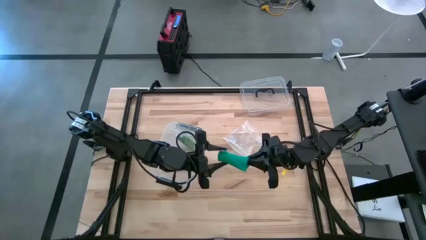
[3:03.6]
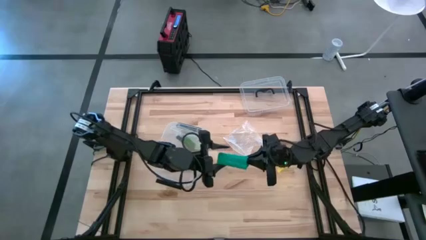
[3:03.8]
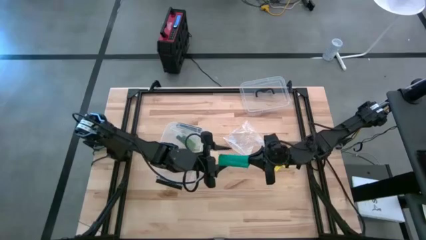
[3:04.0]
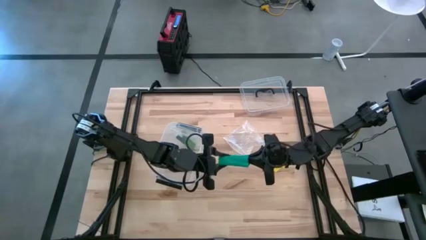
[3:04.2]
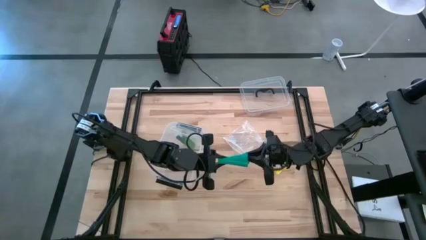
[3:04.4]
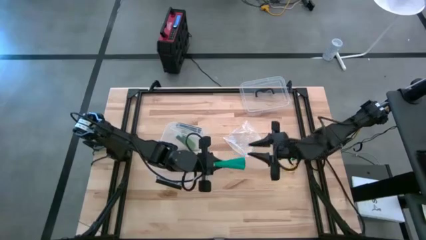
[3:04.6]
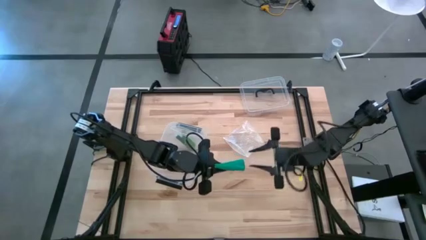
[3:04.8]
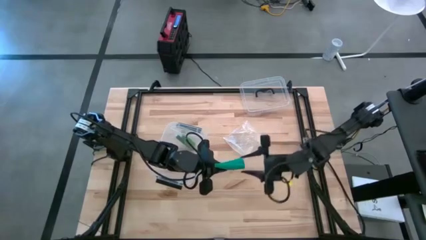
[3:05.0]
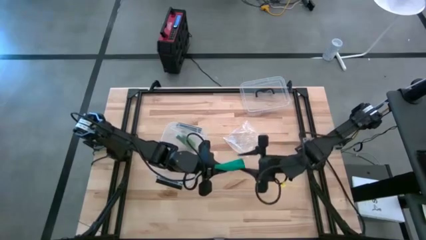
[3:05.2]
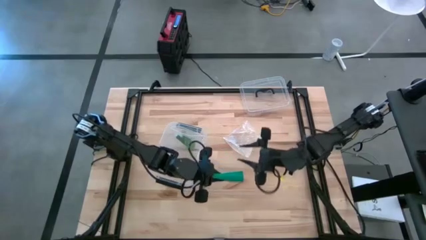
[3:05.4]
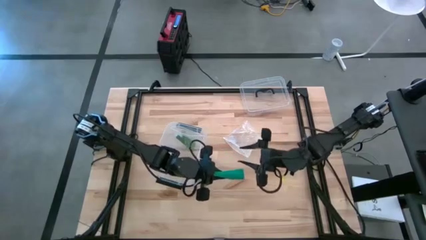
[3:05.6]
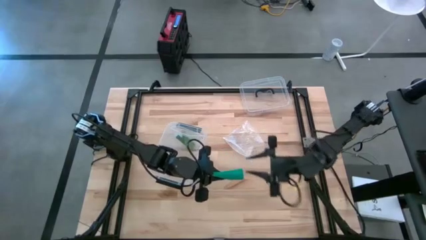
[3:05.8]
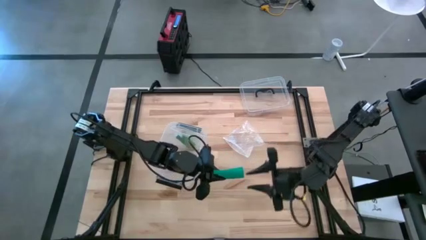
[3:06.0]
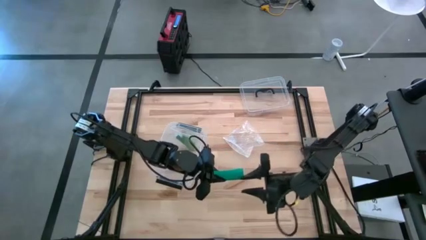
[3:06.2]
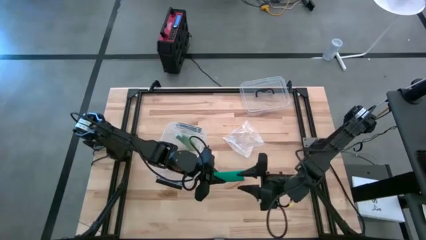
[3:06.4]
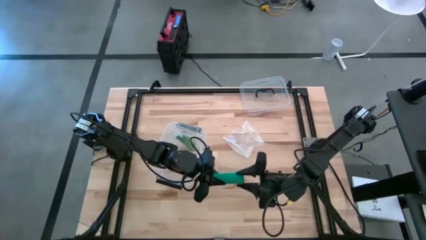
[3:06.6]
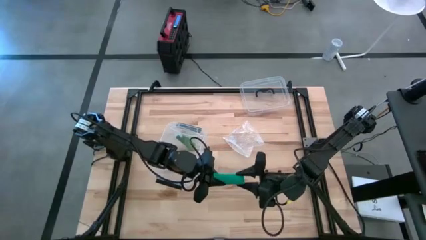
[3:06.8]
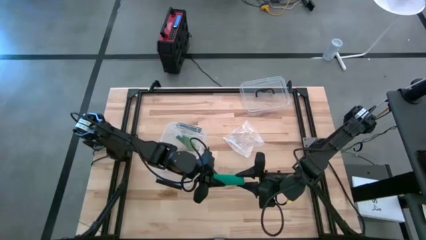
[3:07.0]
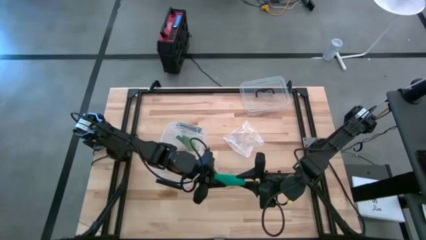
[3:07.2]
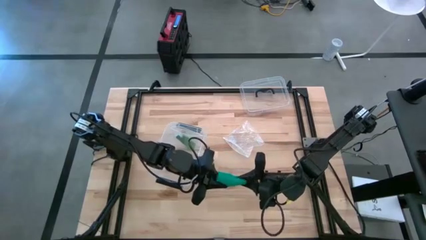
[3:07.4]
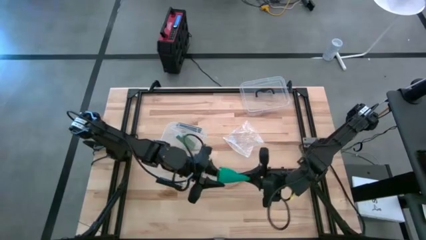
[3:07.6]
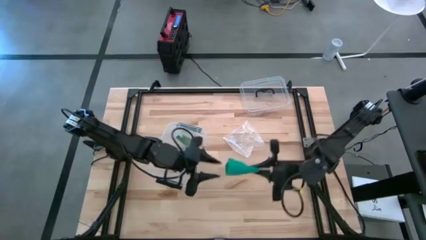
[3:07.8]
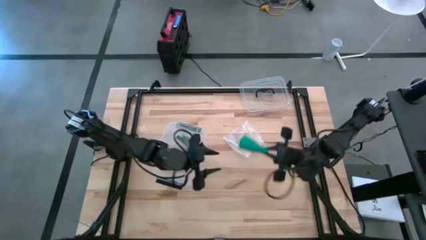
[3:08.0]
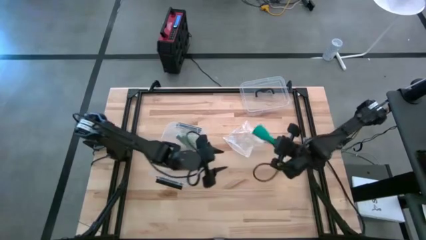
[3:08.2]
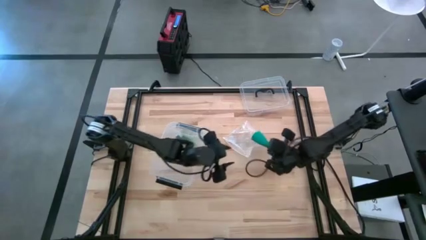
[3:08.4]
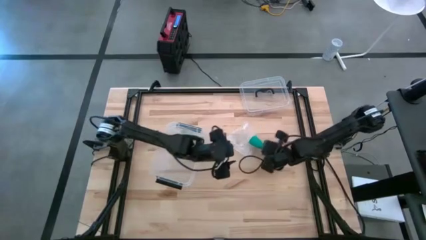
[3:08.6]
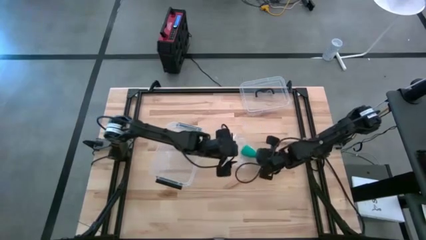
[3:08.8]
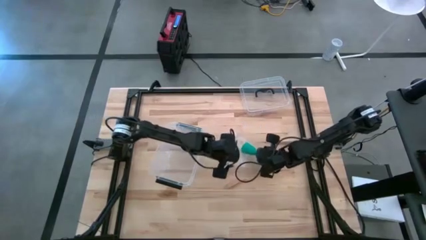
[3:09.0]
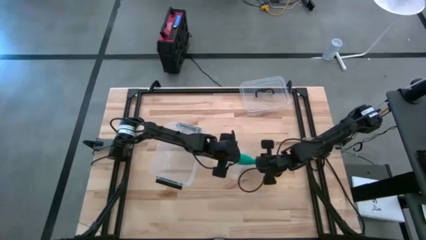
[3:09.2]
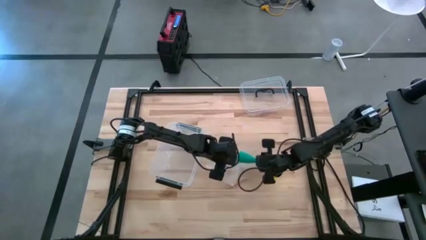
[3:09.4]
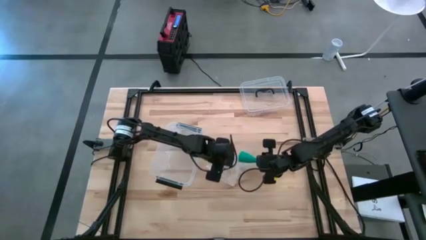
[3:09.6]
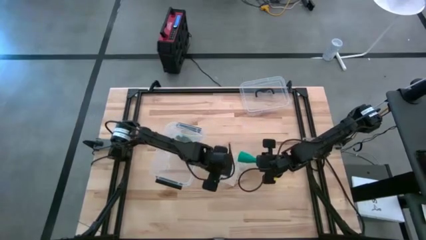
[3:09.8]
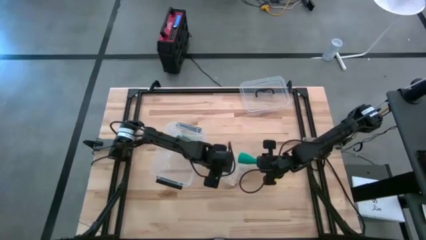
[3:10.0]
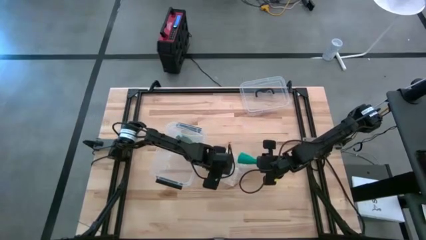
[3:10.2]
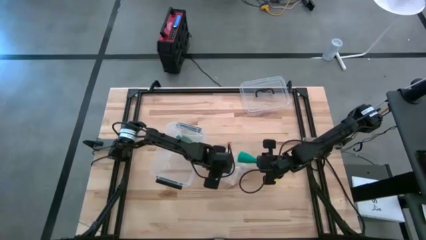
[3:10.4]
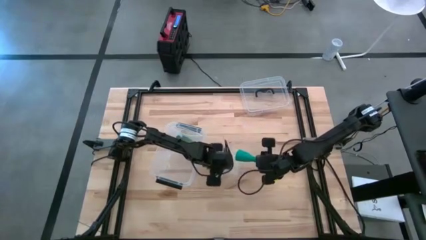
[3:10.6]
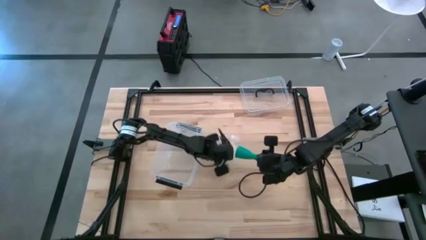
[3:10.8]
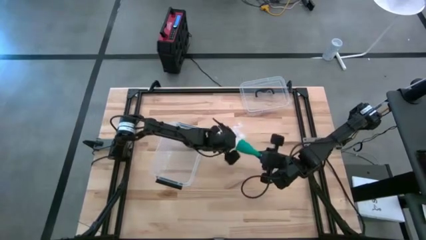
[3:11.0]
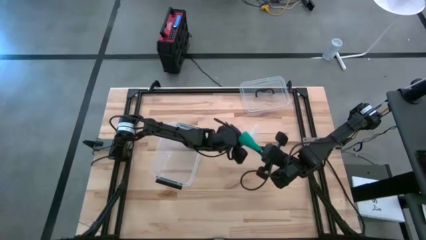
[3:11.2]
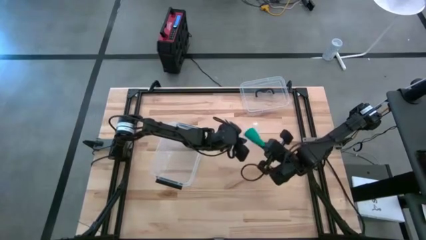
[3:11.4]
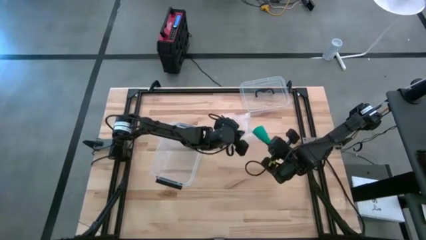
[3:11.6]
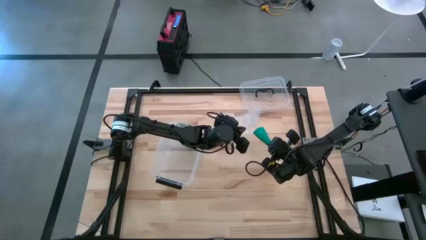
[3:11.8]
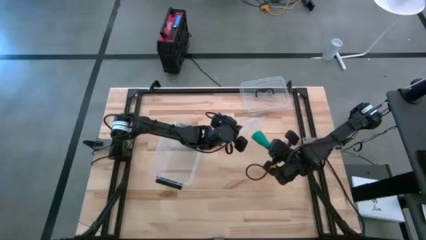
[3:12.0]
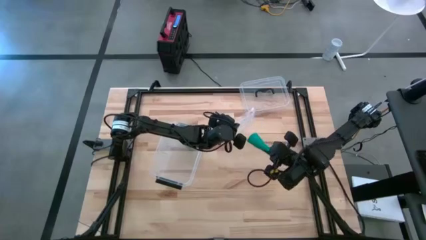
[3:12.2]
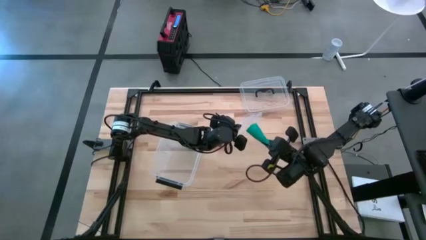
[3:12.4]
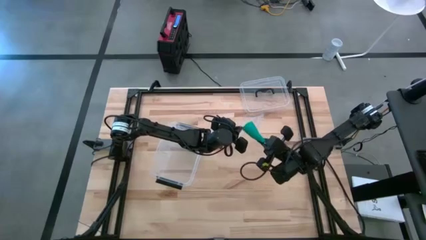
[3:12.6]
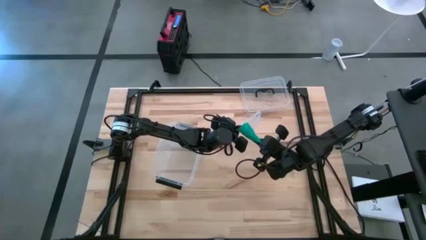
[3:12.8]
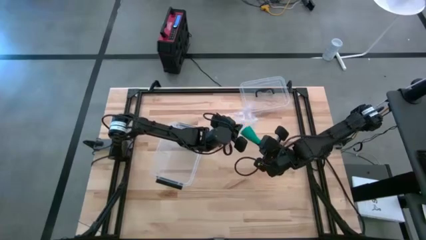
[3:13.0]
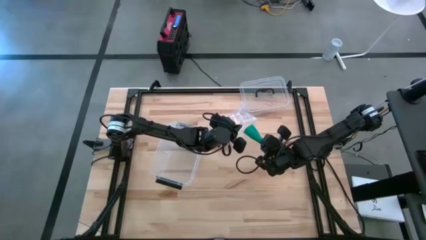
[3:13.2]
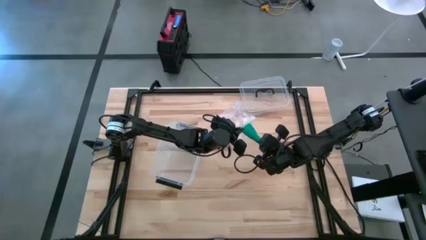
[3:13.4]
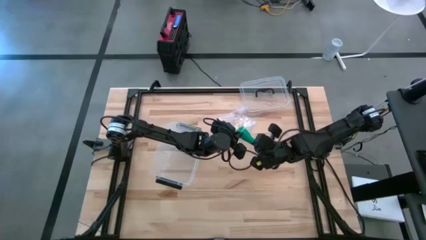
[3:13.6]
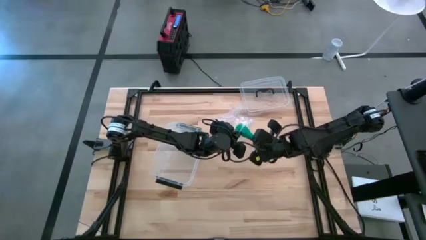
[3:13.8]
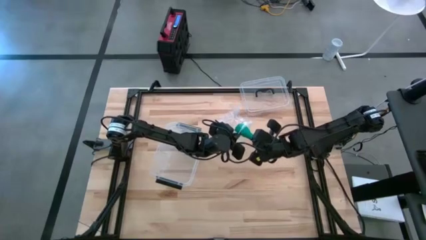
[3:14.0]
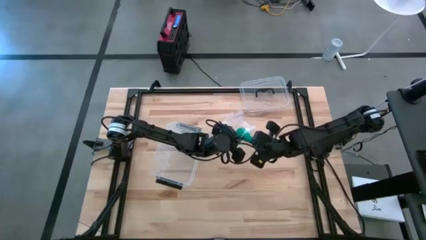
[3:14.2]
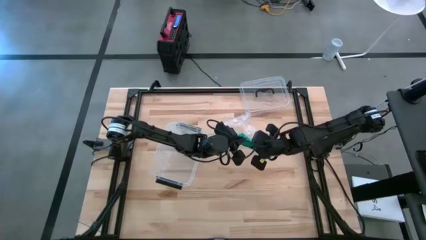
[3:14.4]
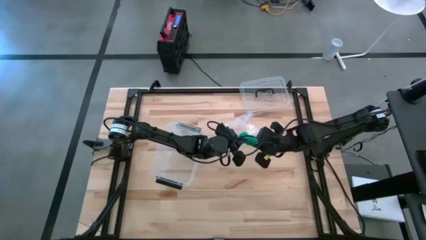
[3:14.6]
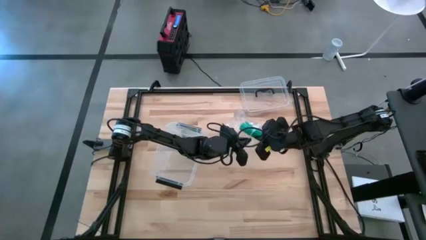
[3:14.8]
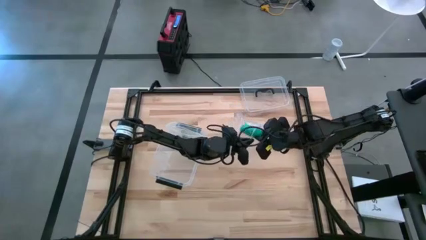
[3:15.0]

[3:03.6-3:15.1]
Task: Roll bandage
Put the blue bandage into the transparent zip bag

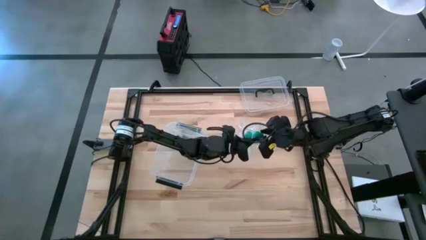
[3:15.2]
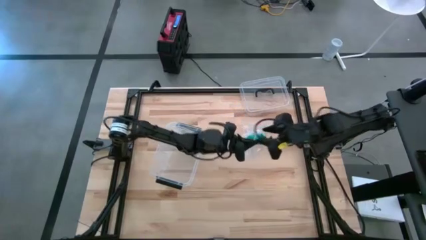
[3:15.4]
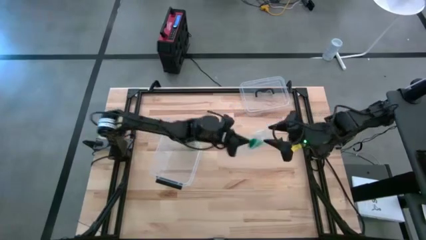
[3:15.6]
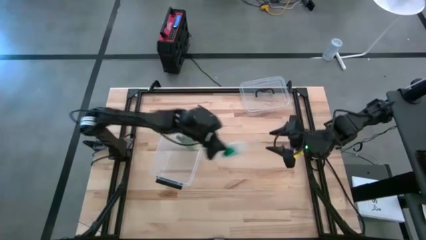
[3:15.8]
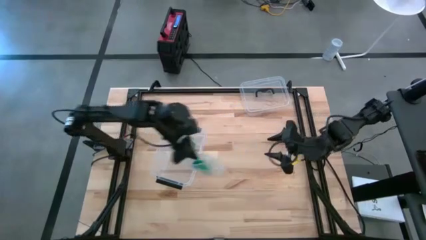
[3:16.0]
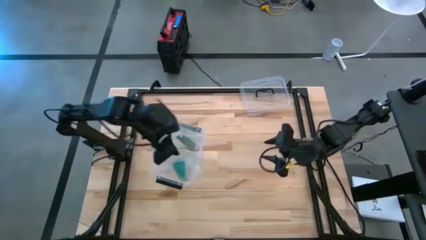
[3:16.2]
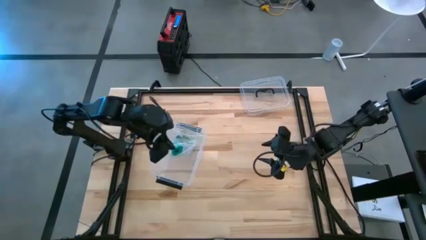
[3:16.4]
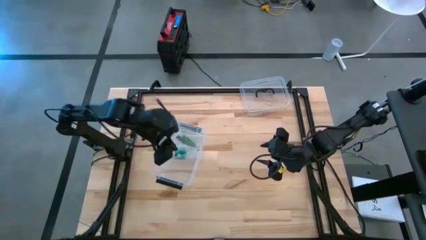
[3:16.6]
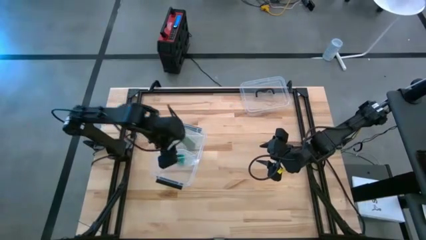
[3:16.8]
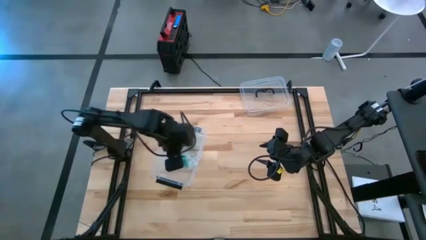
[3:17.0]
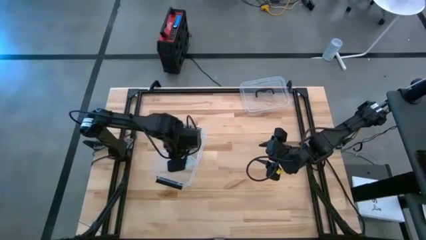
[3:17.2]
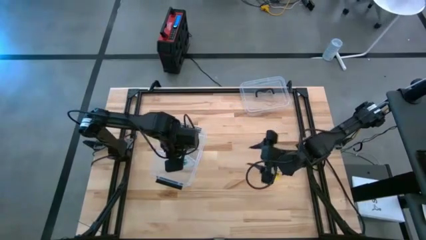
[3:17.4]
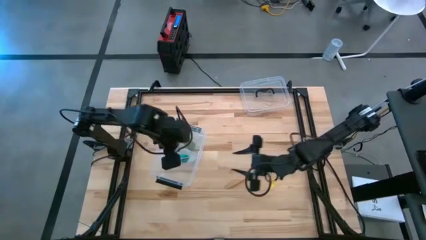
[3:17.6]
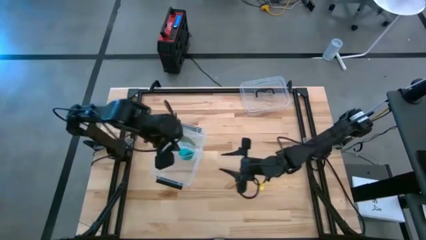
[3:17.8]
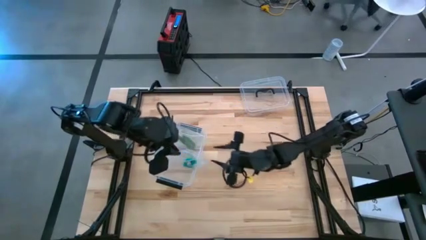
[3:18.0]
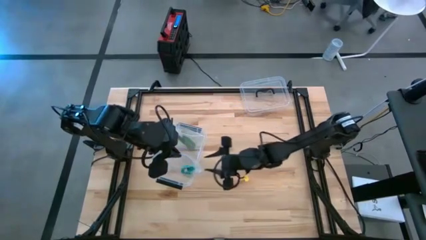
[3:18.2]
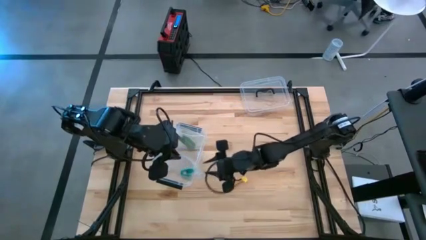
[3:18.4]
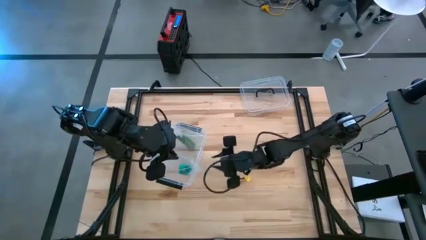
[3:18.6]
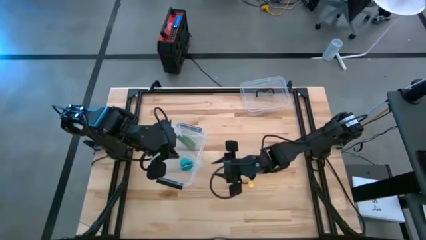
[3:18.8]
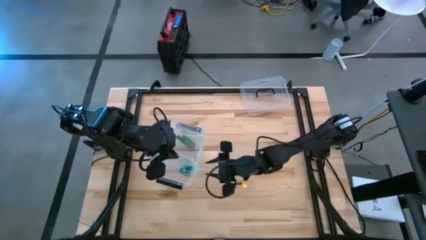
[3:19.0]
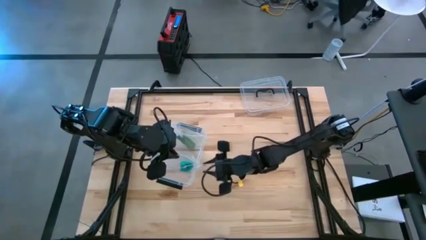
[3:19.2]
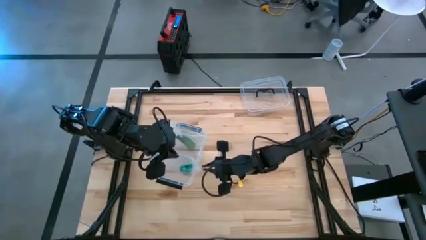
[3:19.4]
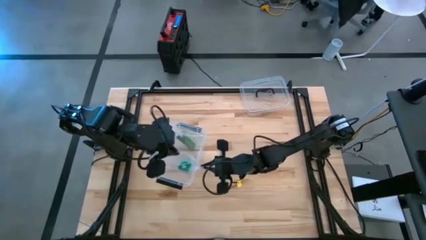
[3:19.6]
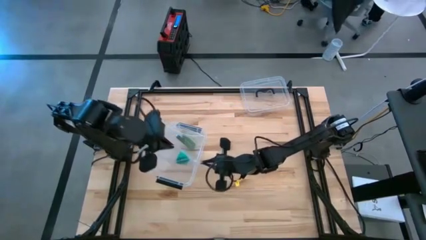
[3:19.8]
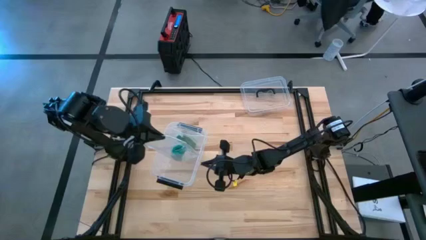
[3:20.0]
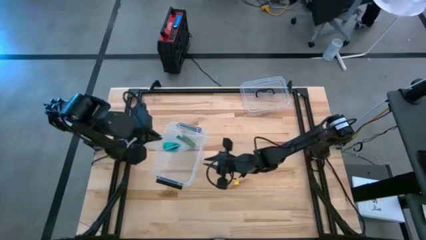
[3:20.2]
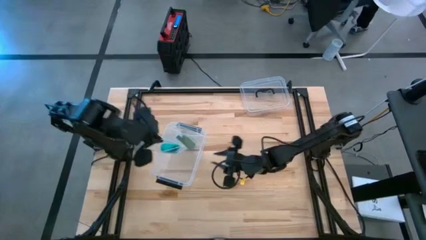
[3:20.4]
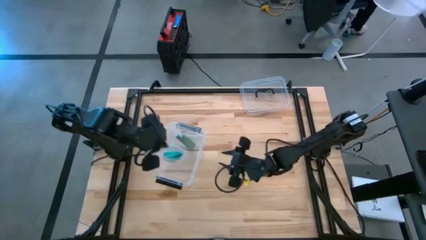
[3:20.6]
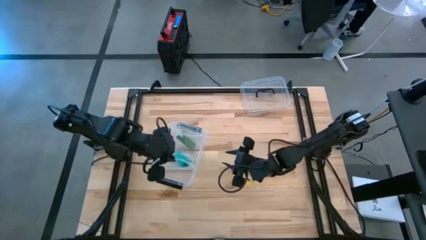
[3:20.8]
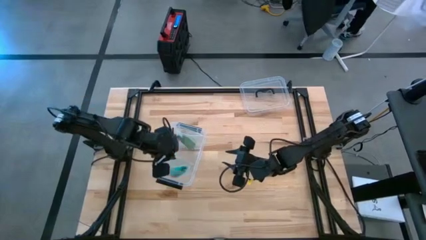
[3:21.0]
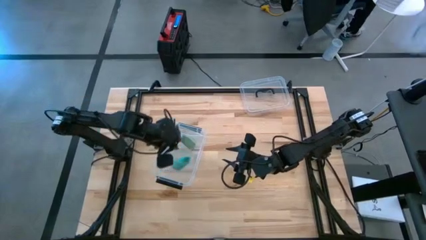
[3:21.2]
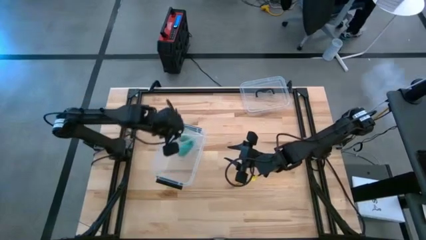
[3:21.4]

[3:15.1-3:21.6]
Put the transparent zip bag into the transparent bin
